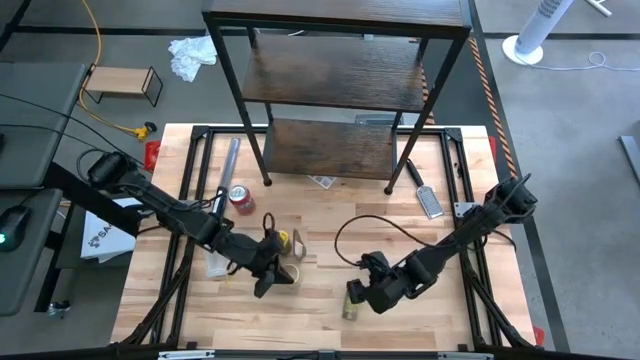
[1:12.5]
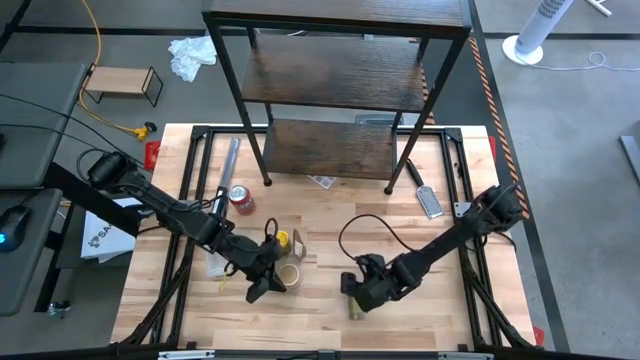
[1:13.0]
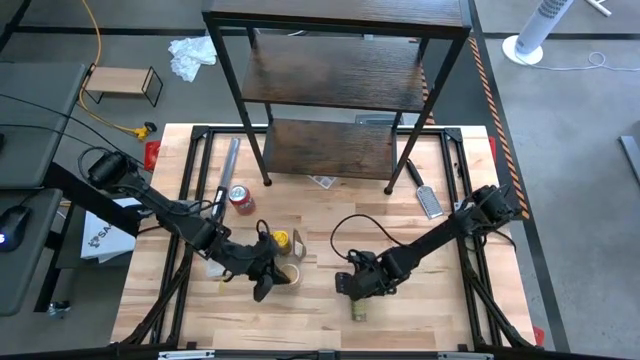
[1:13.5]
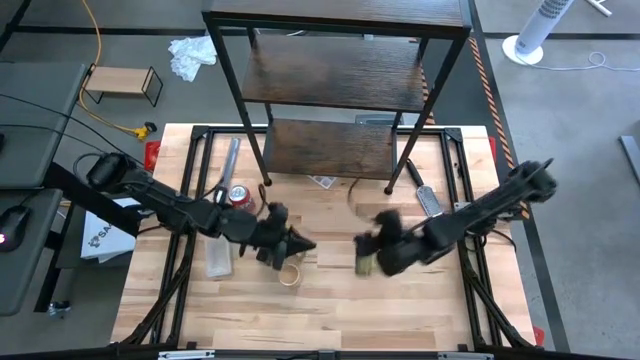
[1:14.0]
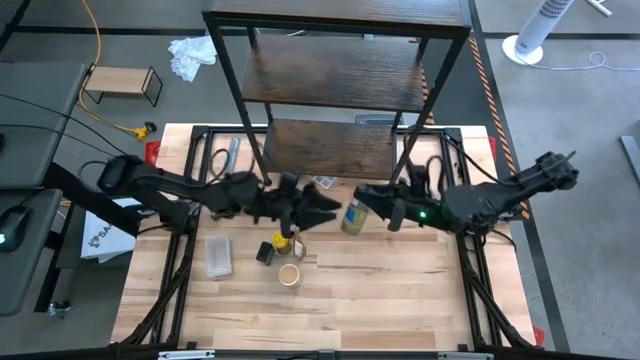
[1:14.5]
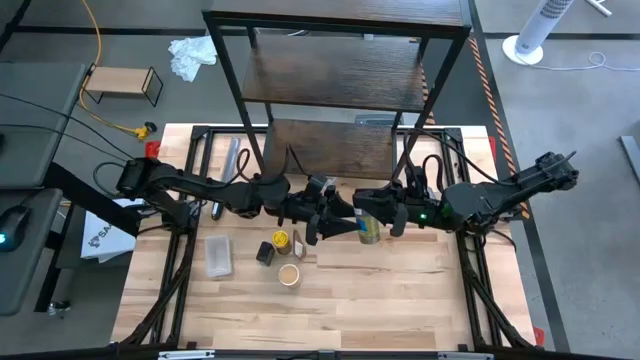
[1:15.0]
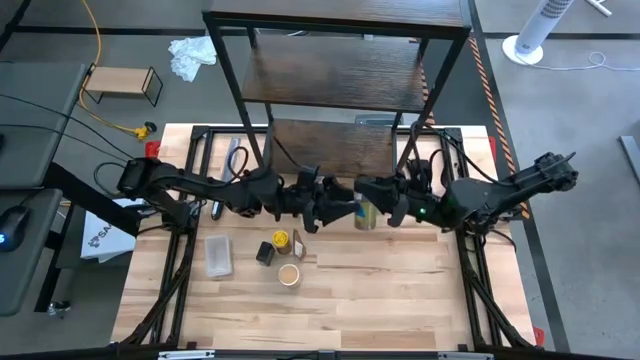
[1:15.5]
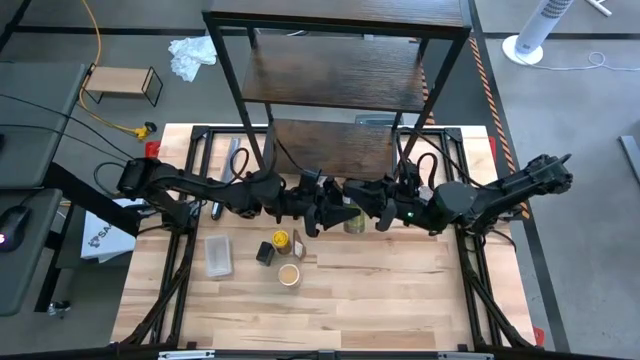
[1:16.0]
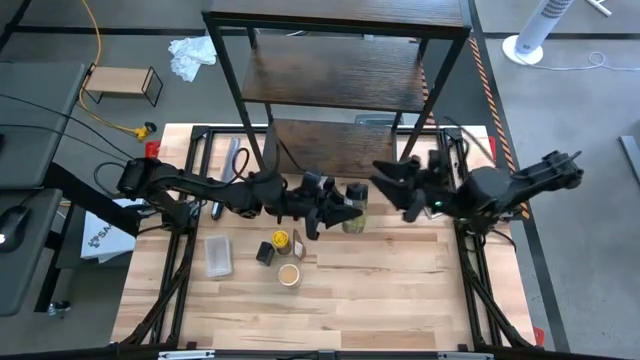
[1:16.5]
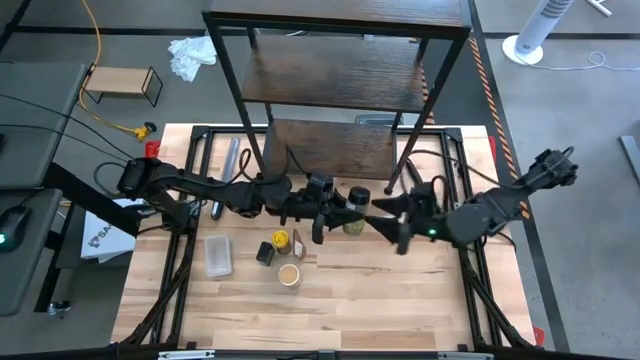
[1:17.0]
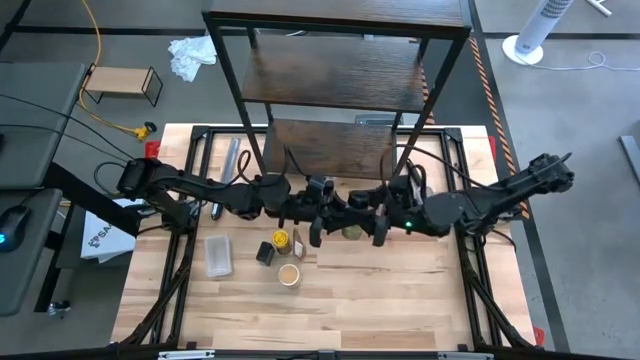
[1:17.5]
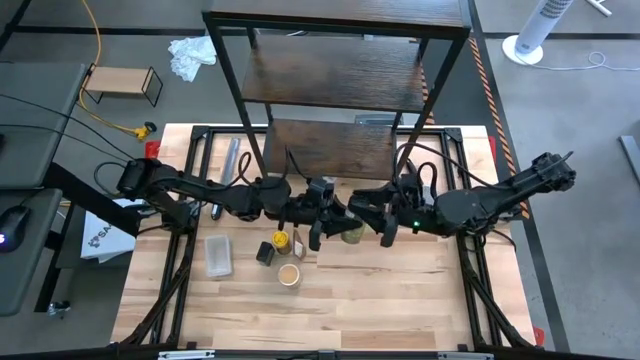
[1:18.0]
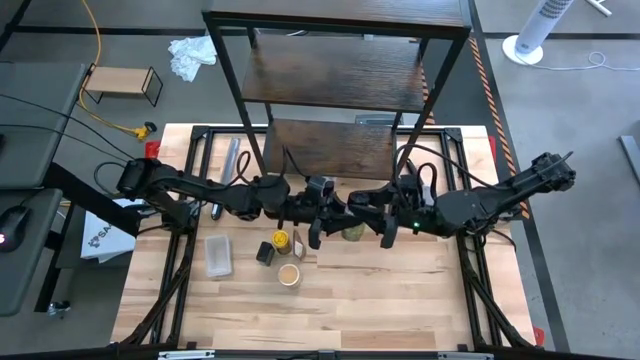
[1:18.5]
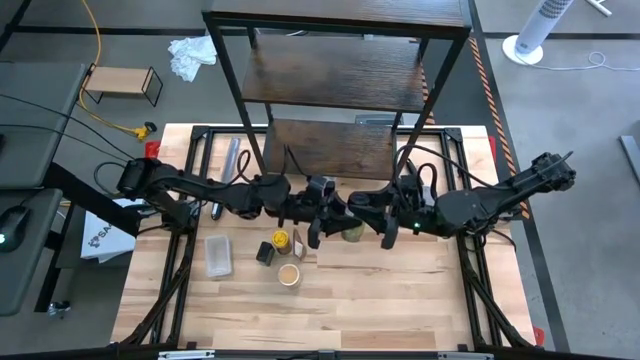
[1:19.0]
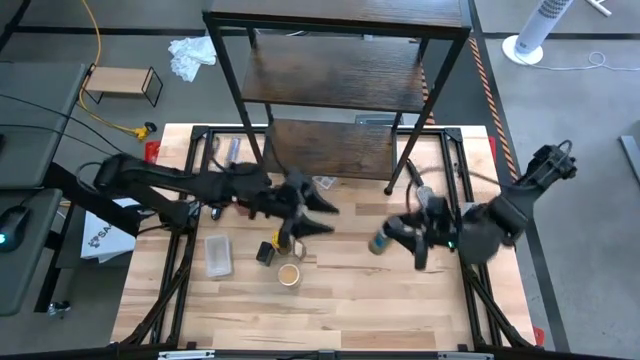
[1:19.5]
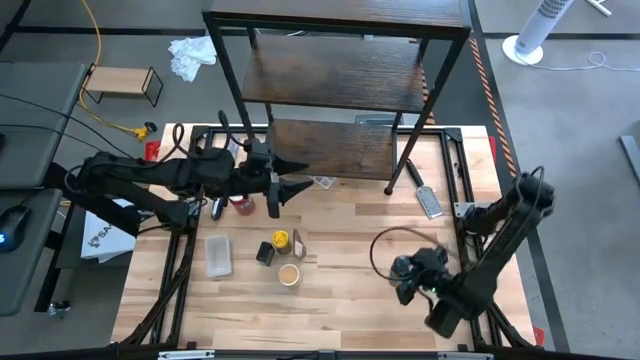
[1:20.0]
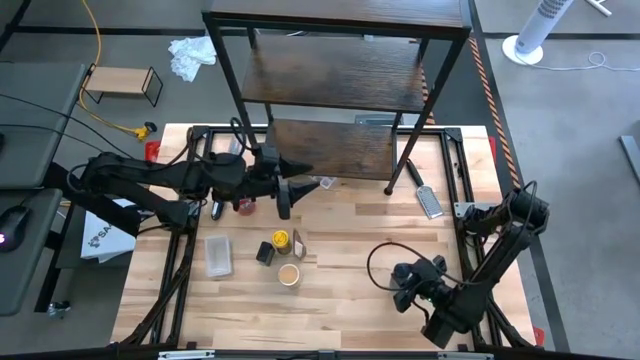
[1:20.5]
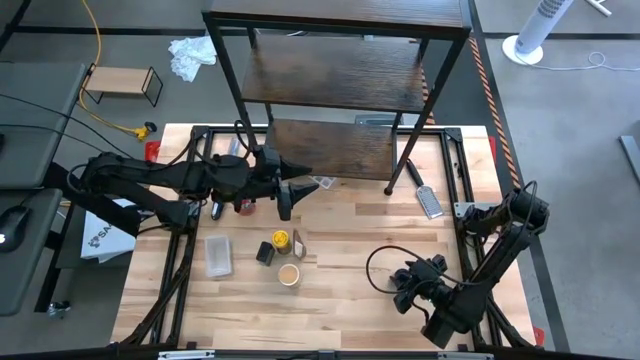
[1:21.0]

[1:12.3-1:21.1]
Task: Shelf spices
Adjust the black seasoning bottle

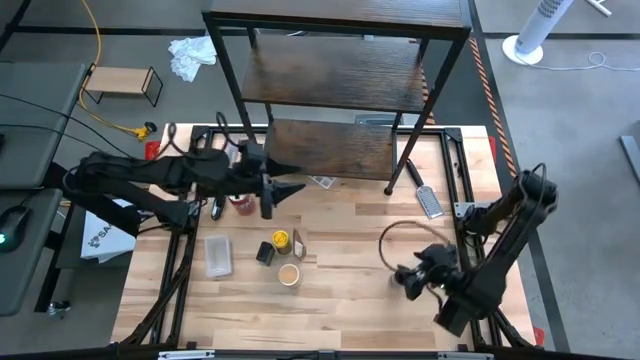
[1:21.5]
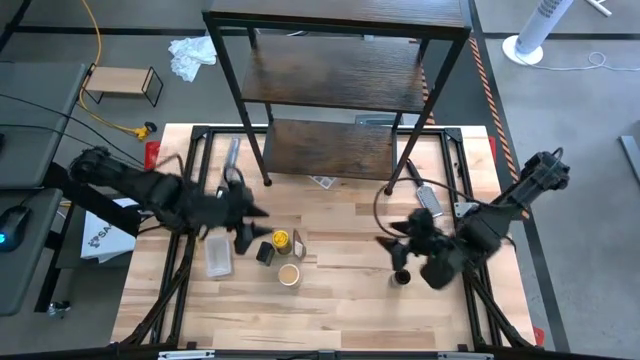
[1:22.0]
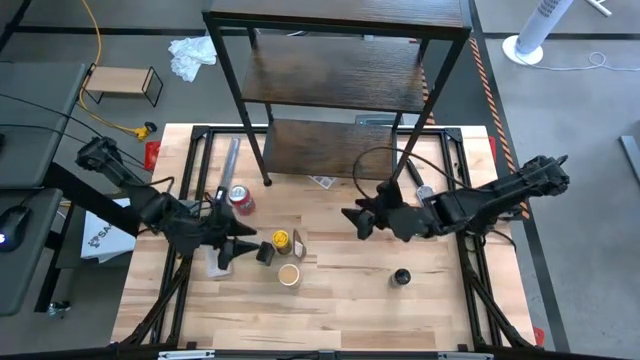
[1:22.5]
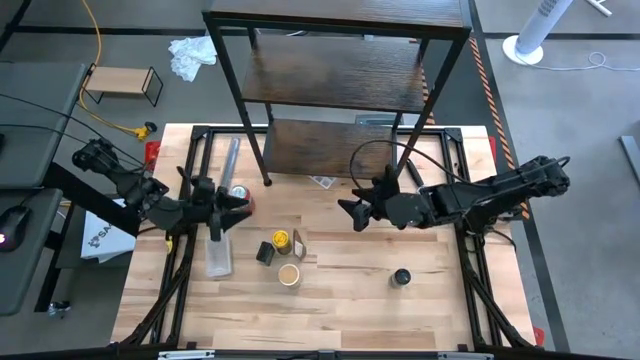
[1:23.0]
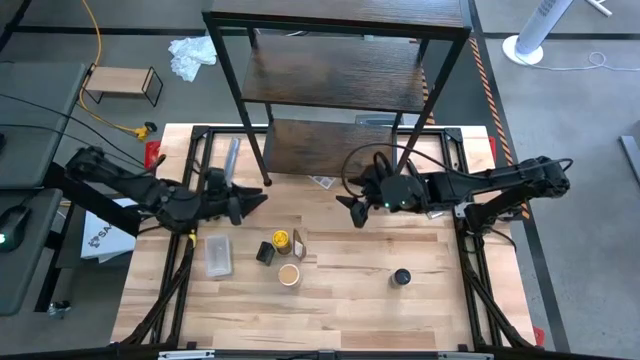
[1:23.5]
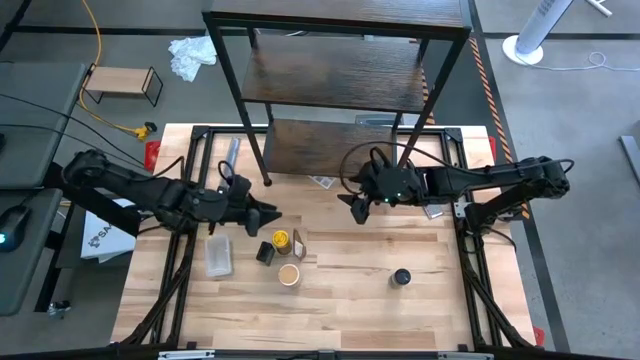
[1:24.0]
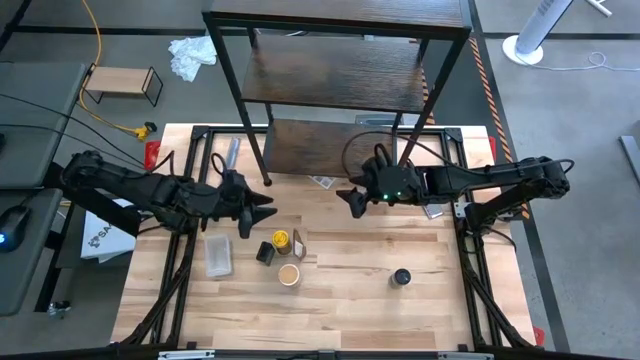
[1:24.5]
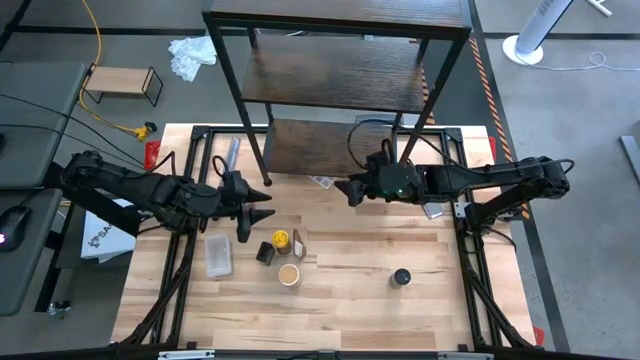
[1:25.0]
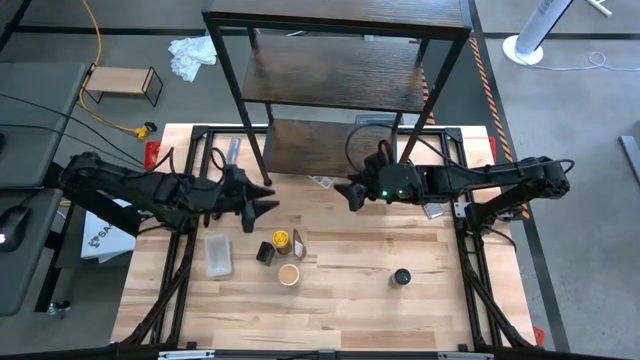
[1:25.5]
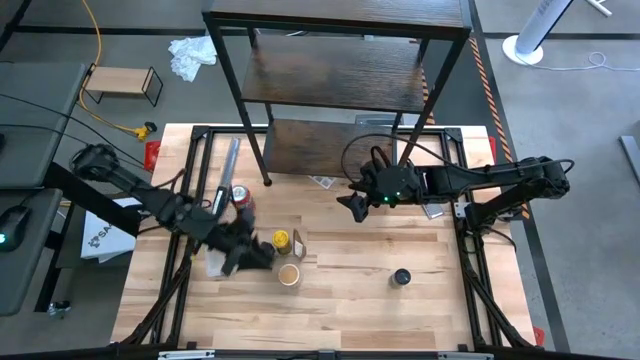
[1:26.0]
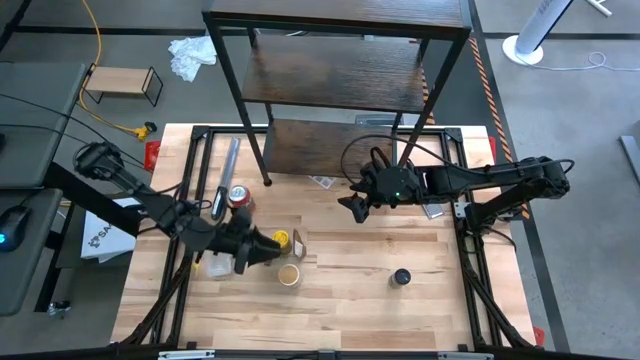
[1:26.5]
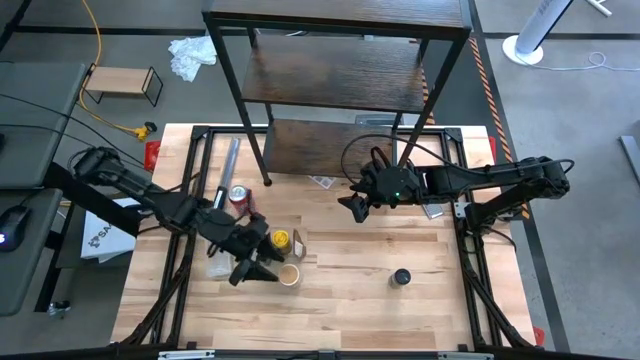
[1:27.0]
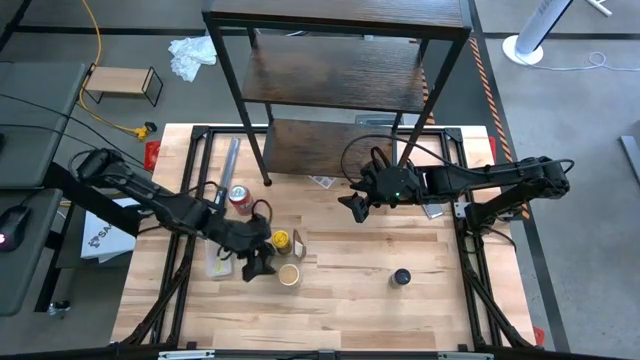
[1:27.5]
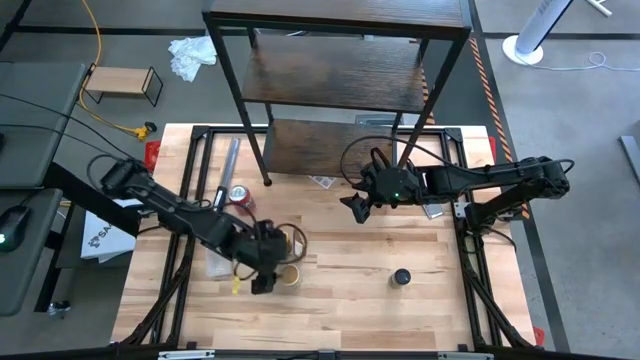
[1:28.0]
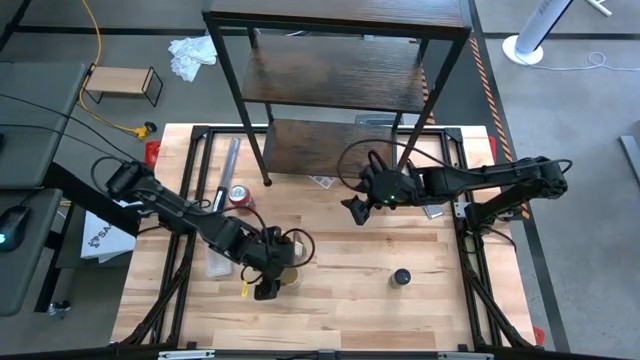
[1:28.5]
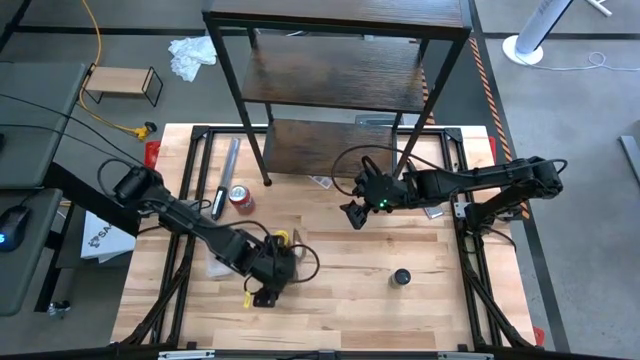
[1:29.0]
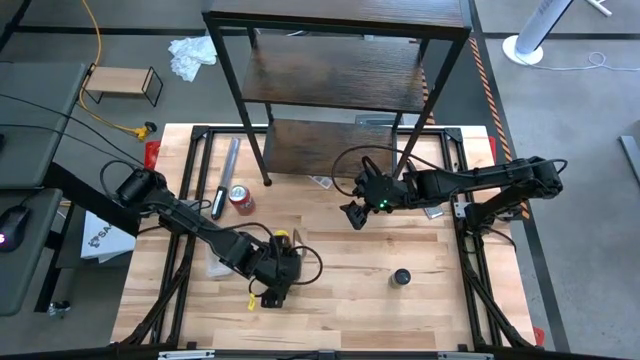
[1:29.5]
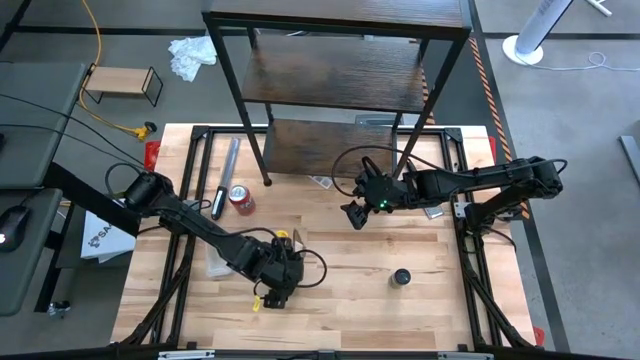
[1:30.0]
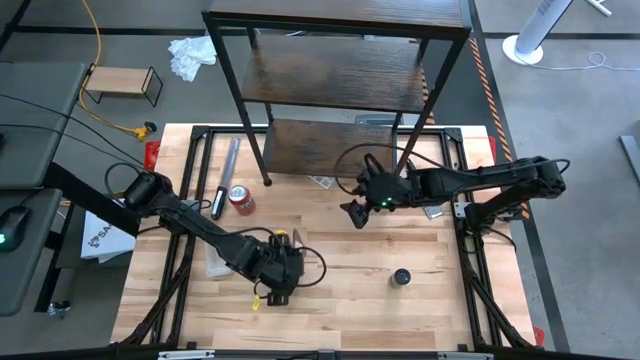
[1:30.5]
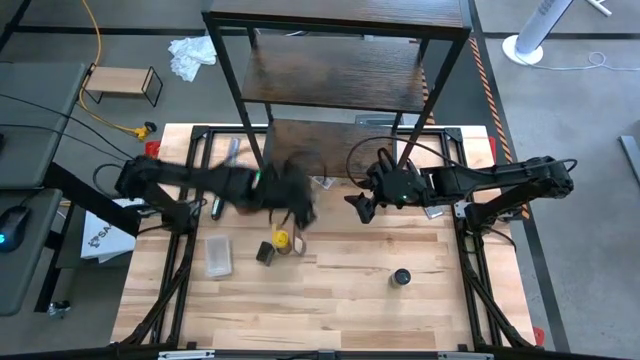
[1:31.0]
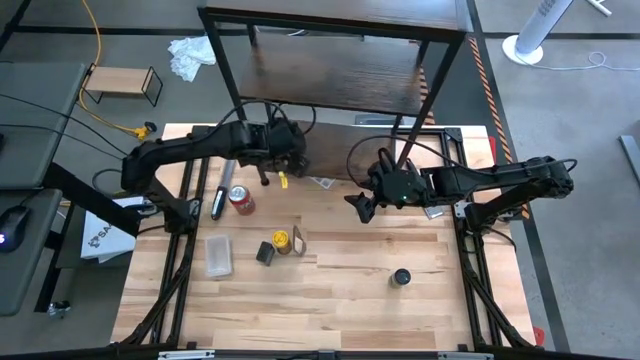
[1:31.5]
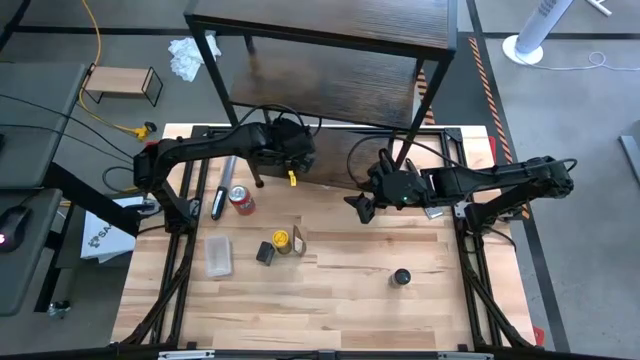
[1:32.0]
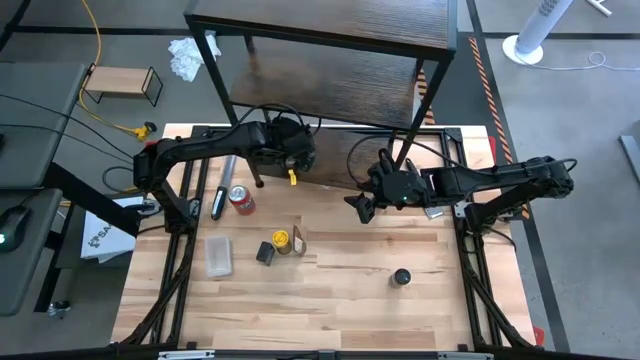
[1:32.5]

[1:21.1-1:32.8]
Put the brown seasoning bottle on the bottom shelf

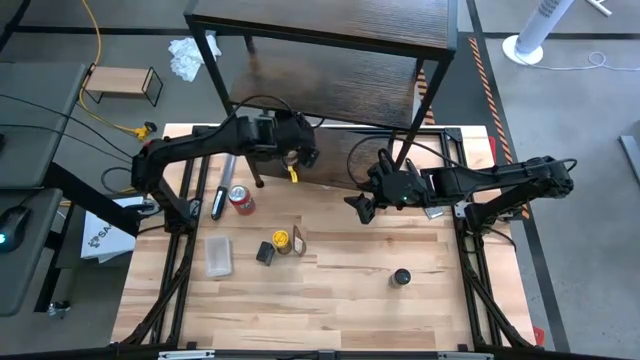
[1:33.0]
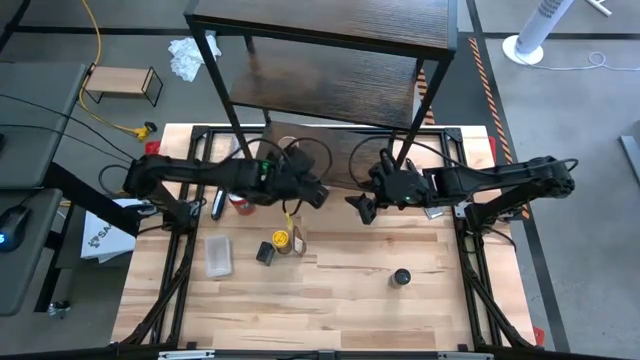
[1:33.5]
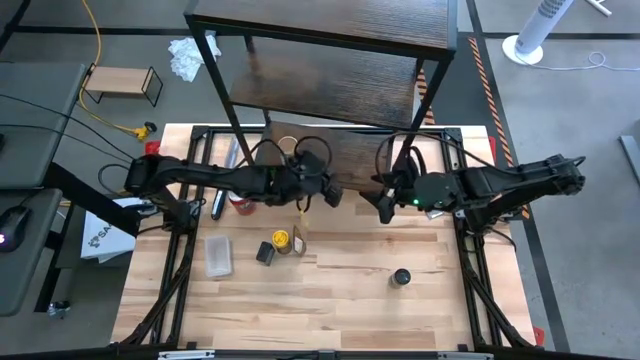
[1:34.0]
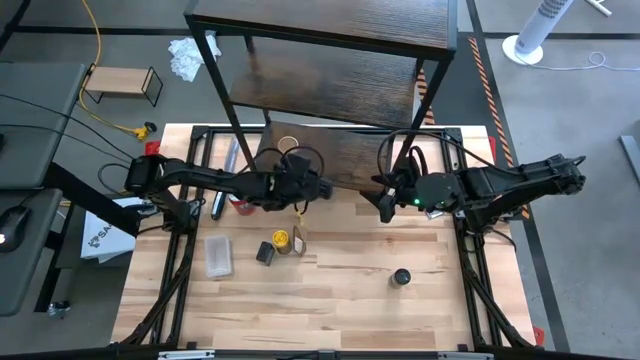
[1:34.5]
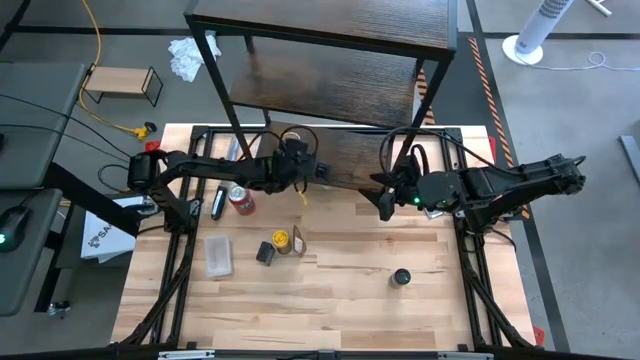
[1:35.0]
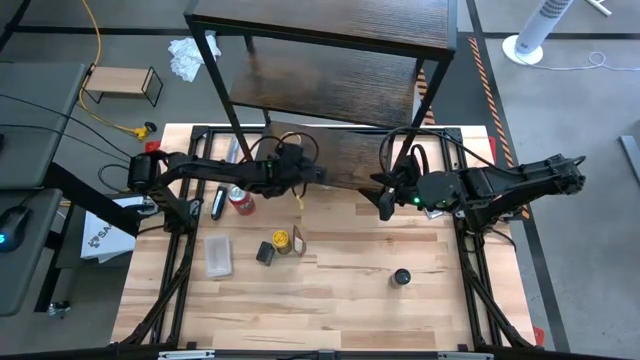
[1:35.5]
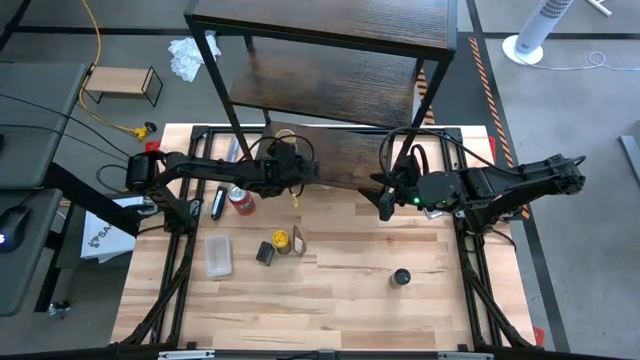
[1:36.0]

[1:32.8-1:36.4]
Adjust the brown seasoning bottle
